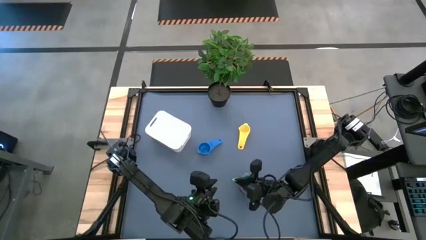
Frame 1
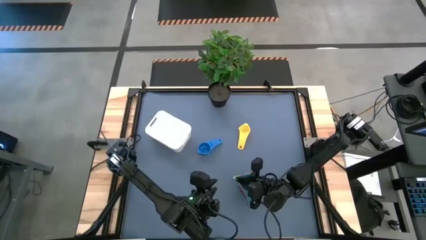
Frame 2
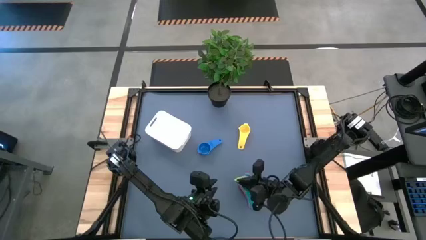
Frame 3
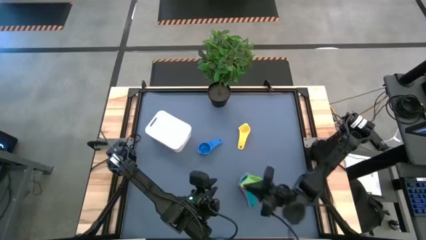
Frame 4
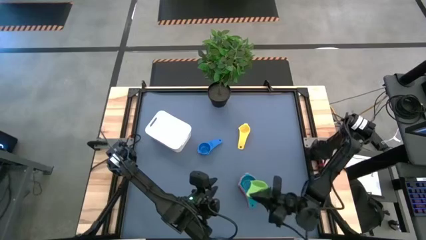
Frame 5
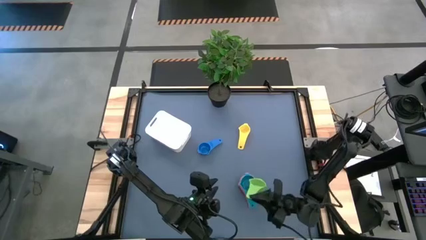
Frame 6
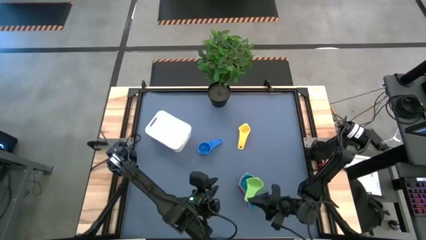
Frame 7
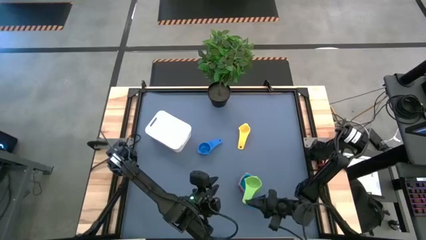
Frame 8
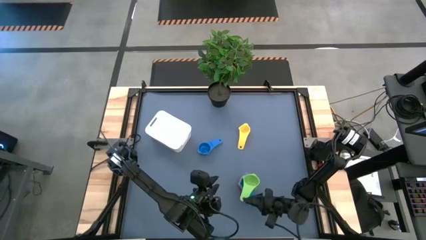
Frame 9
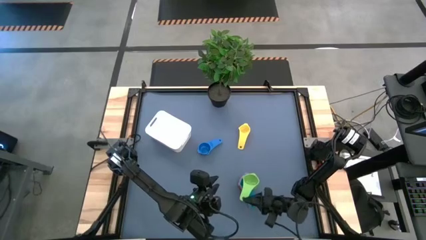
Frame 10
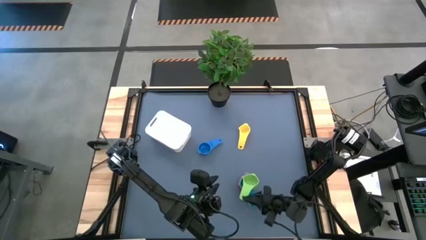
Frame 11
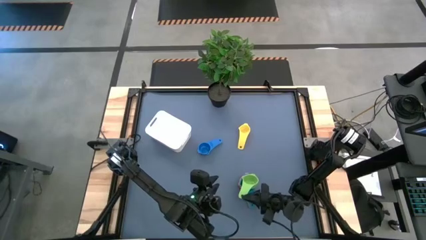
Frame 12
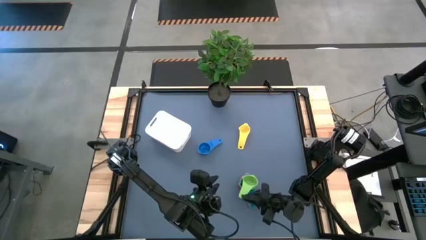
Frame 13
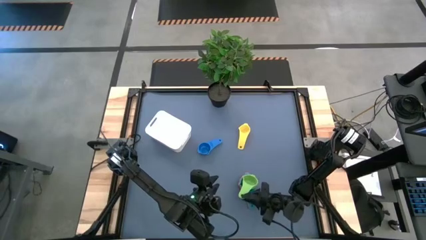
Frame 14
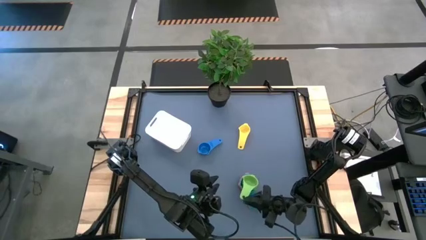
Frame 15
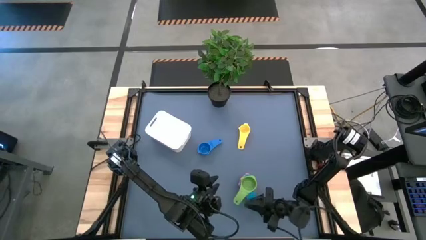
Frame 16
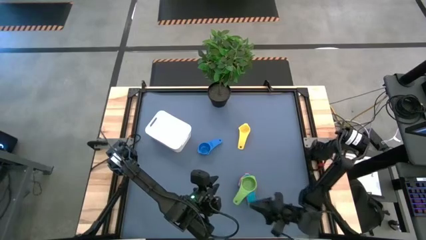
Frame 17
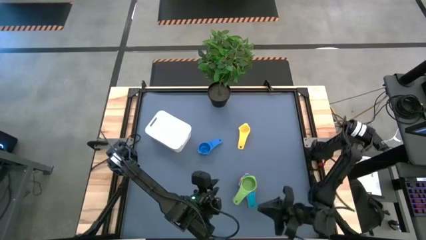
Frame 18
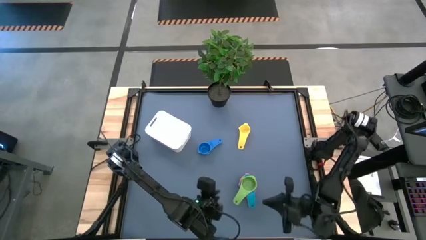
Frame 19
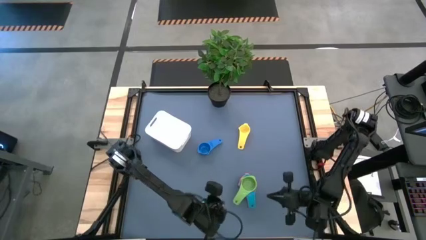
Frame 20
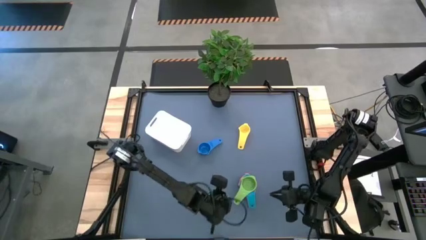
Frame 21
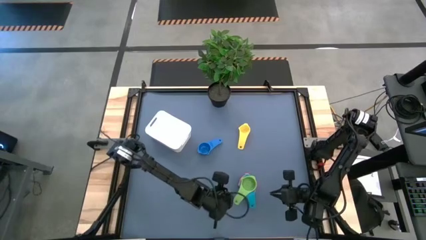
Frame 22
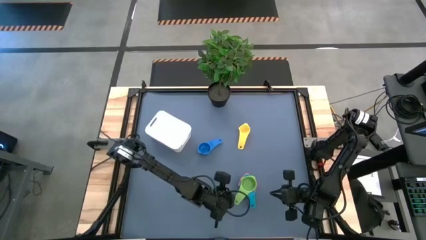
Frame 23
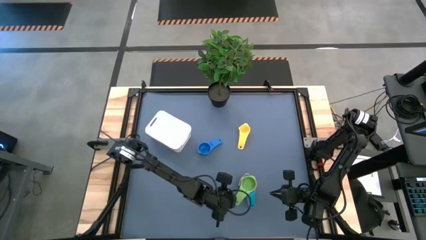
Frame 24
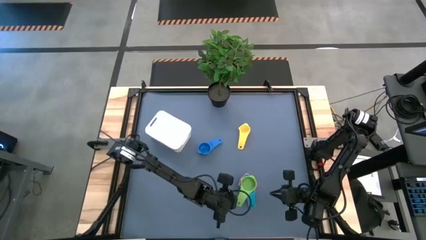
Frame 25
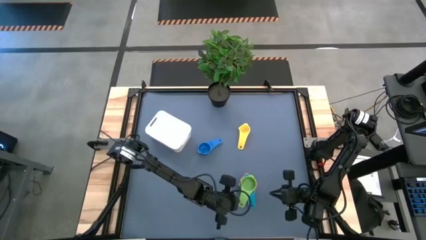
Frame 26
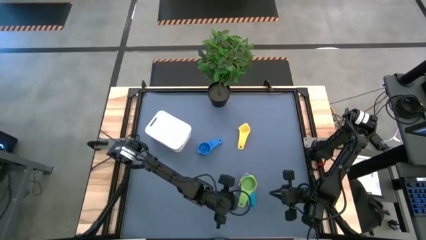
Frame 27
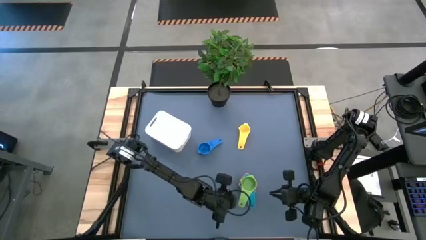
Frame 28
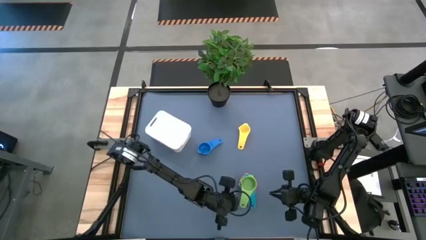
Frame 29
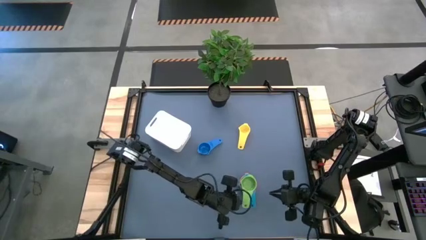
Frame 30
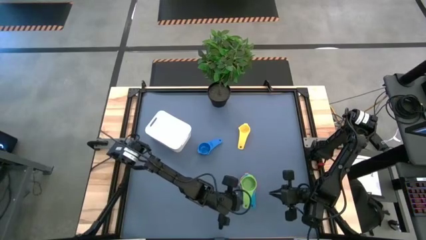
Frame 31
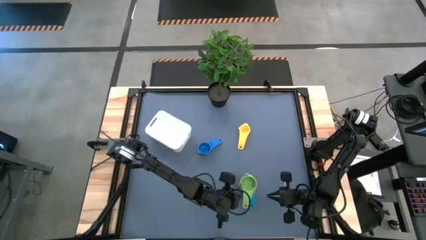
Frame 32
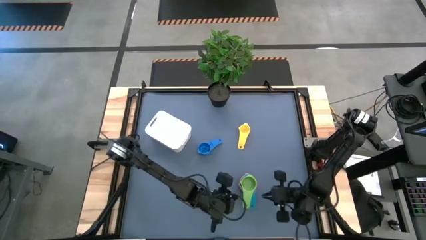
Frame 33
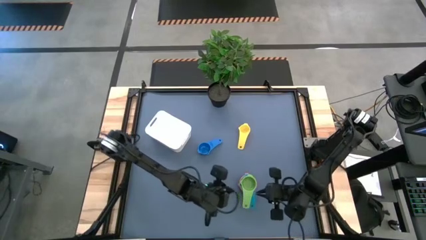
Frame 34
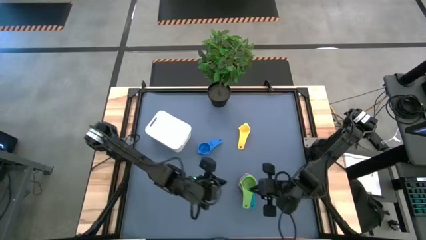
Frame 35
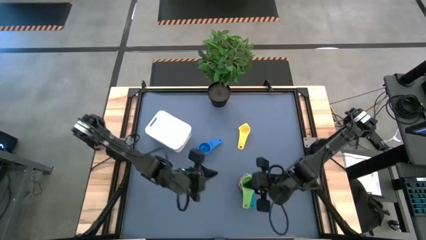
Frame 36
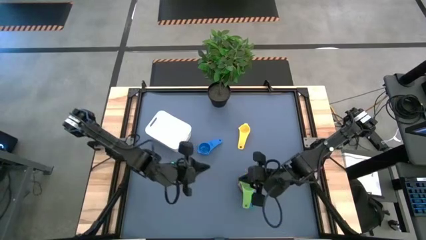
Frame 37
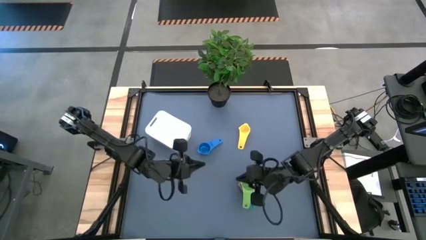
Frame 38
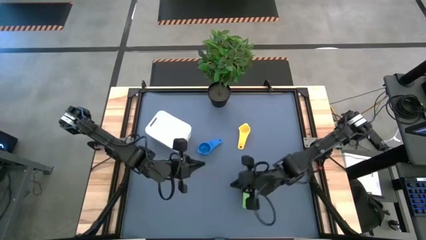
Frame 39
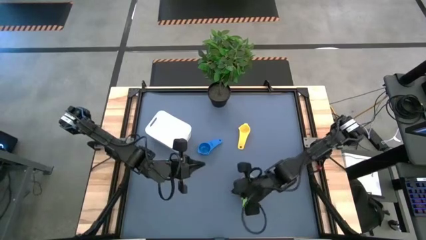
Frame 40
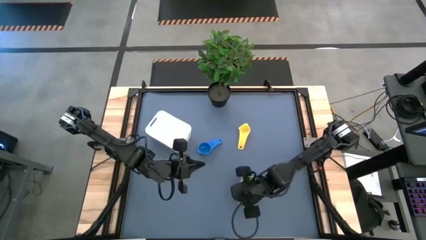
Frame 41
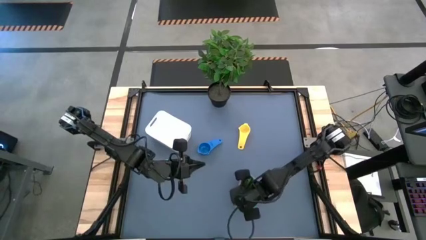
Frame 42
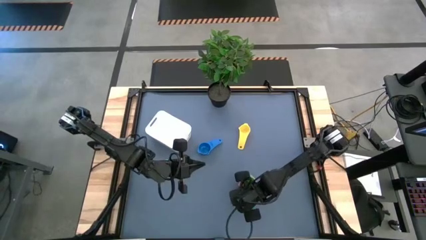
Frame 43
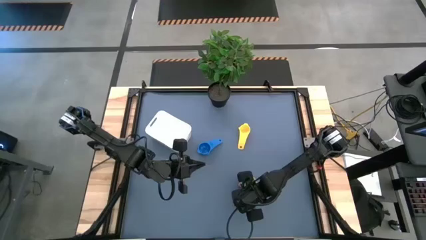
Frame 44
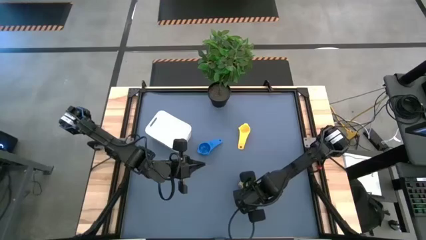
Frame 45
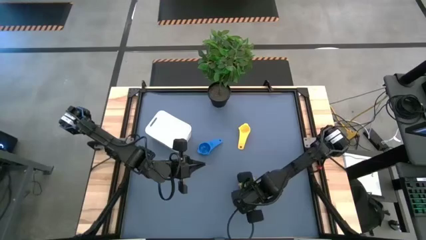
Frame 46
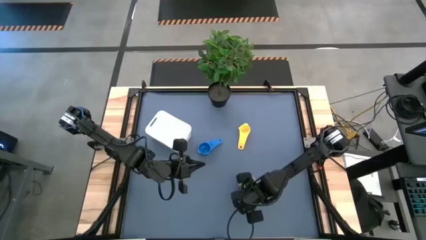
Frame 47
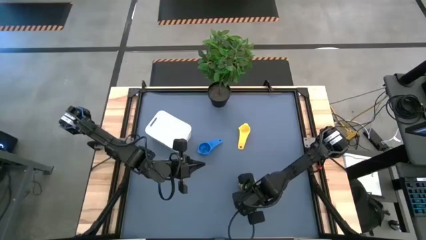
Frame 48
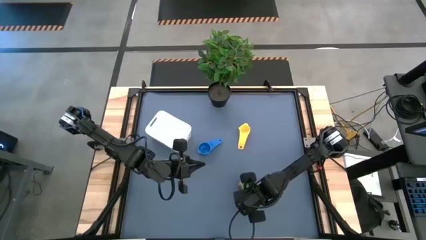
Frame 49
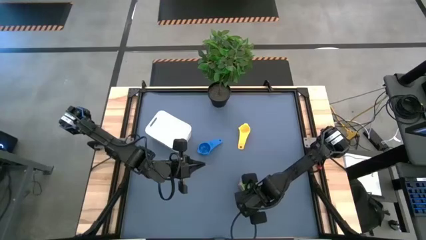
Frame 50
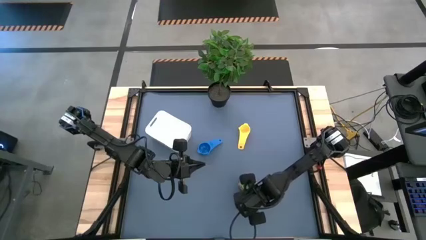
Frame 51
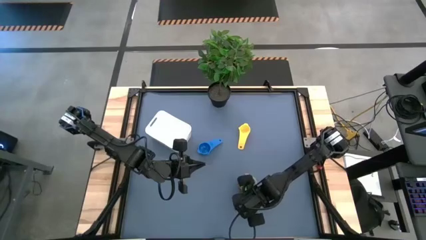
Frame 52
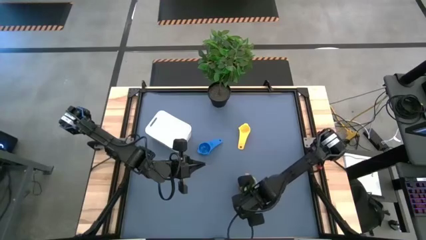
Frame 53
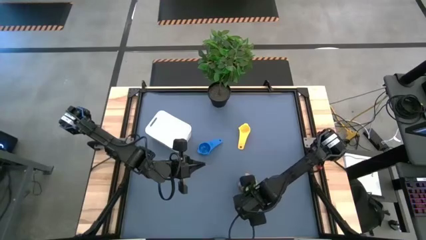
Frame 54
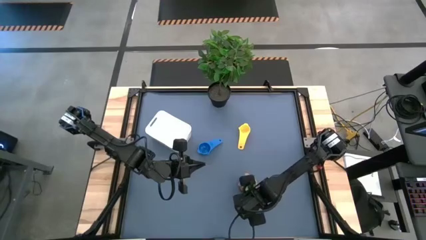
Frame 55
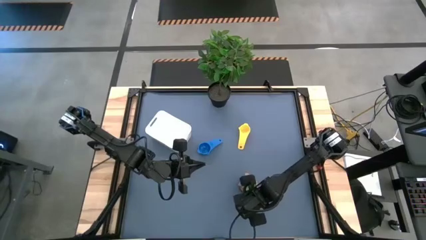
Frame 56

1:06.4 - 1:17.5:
Task: Nest measuring cups in basket
Stack the light green measuring cup on the light blue measuring cup

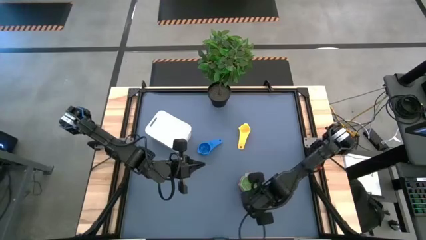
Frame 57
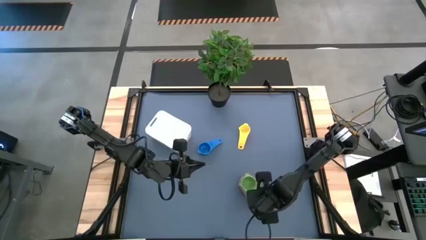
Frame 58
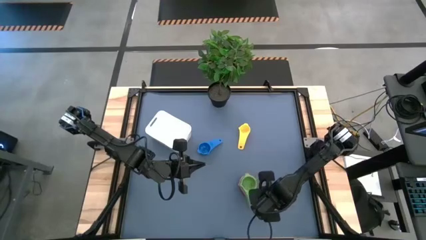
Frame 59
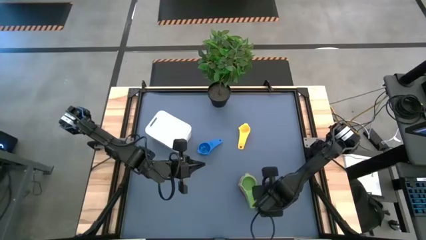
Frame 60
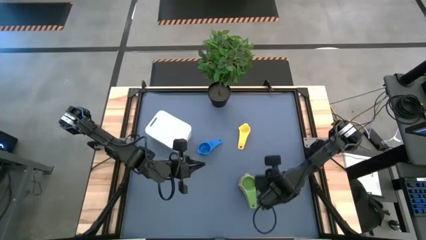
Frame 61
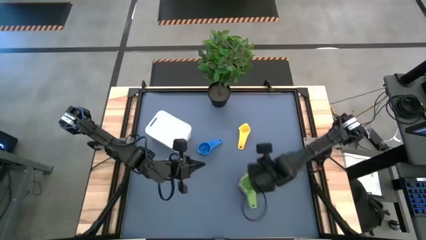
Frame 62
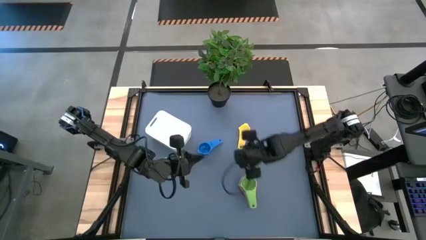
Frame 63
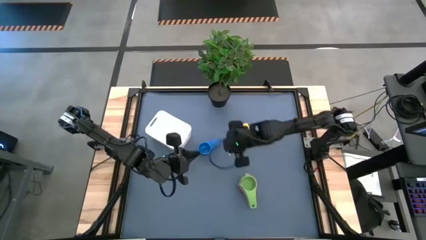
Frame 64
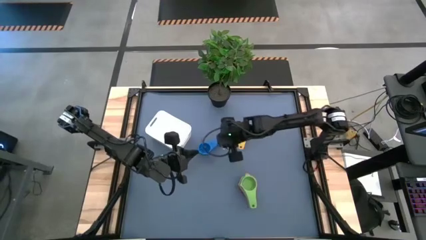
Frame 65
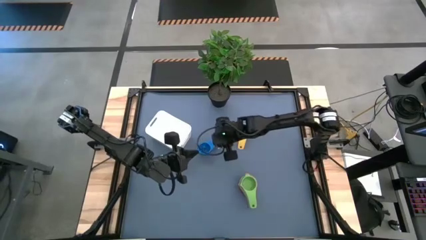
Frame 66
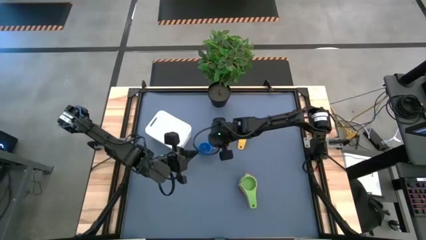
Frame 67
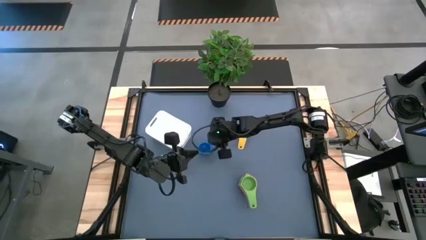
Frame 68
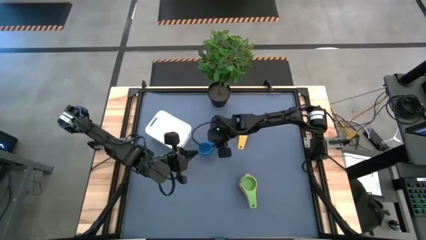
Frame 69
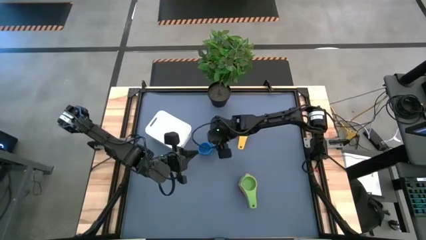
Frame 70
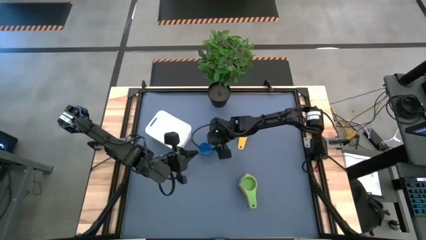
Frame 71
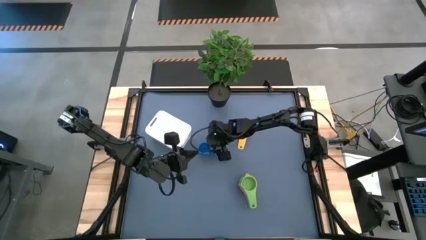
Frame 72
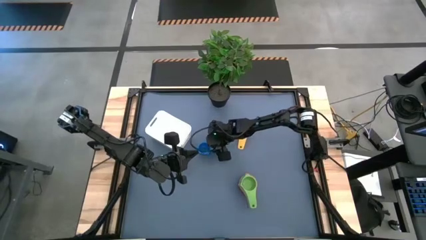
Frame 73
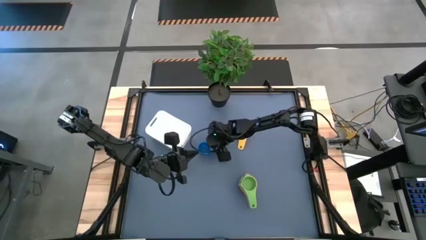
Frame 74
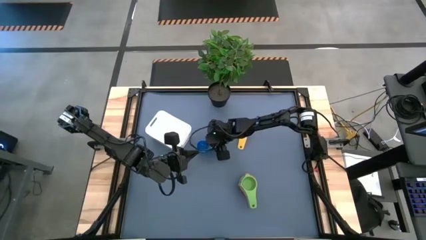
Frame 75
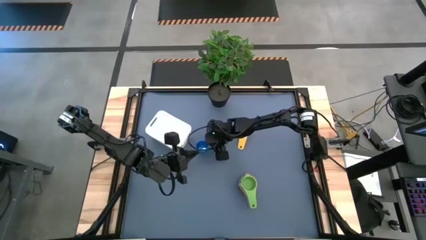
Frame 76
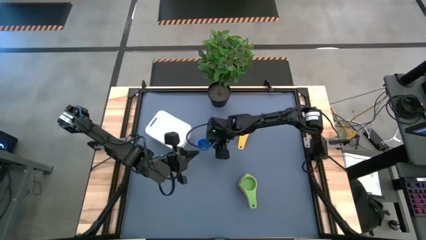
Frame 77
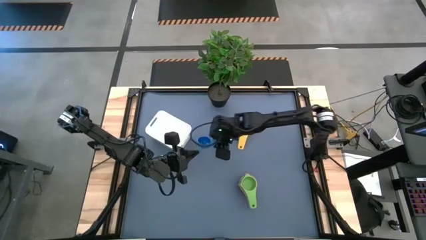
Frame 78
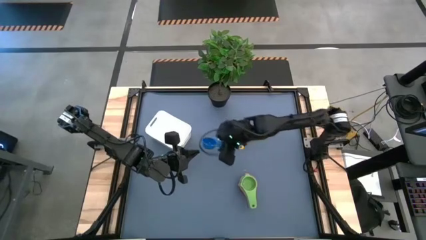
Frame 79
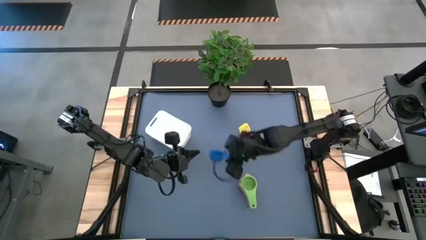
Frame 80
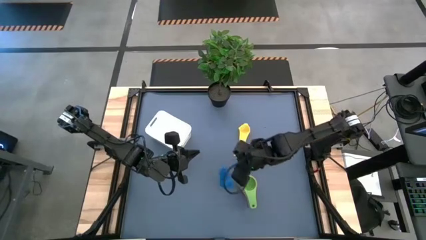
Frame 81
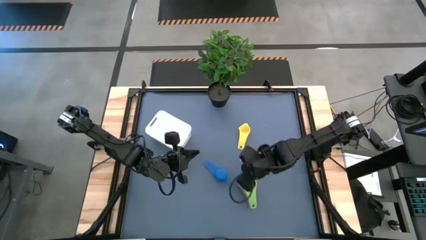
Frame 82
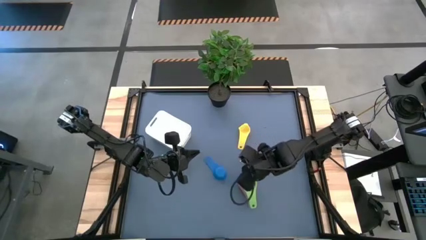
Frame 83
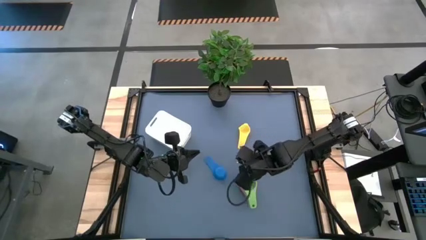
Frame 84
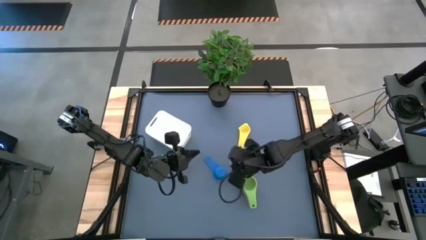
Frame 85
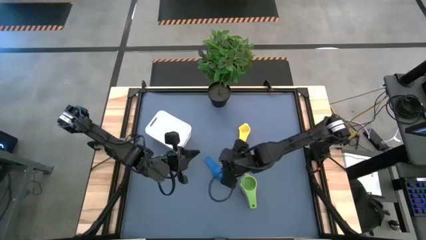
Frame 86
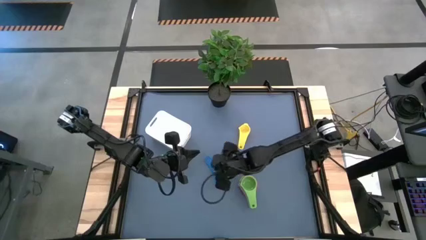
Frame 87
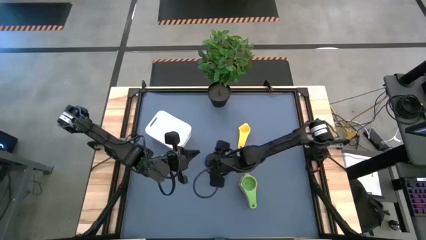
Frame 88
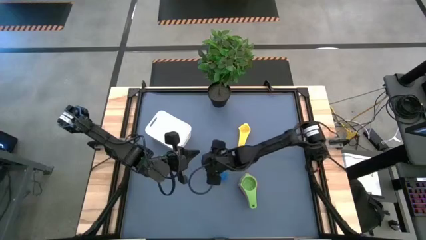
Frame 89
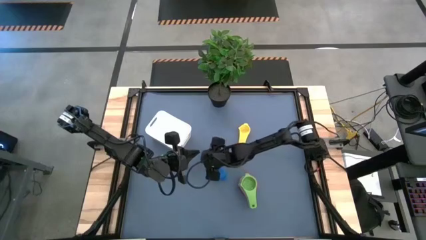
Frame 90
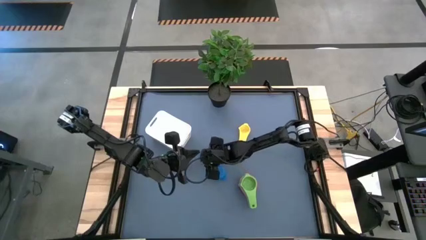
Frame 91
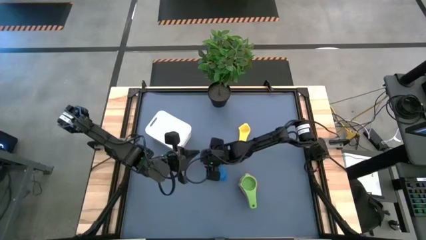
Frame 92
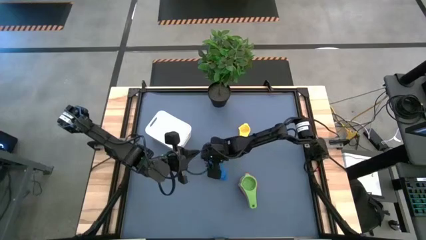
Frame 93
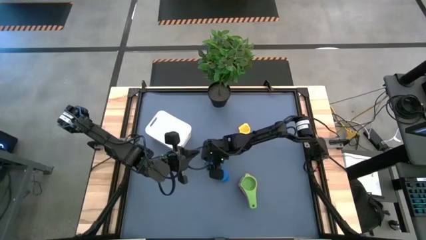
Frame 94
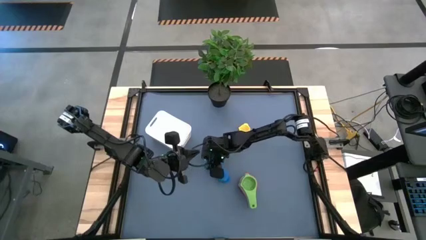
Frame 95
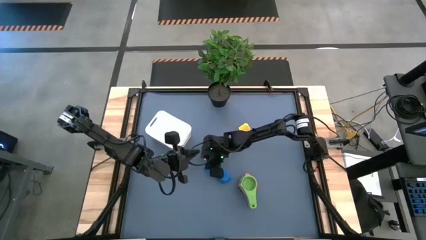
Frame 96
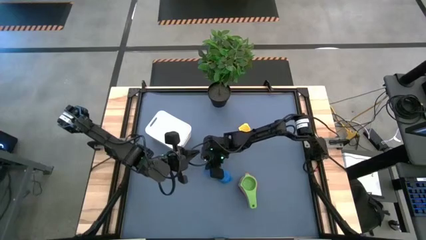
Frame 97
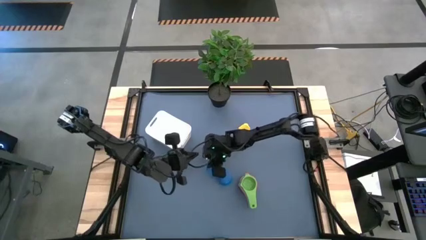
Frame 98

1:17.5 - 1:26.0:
Stack the blue measuring cup on the light green measuring cup
